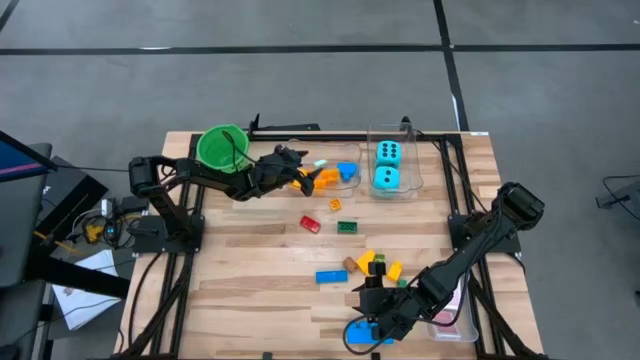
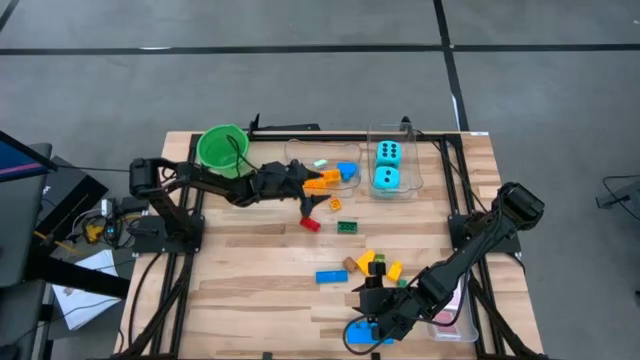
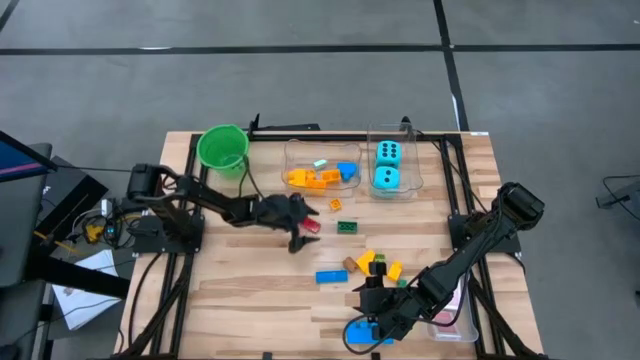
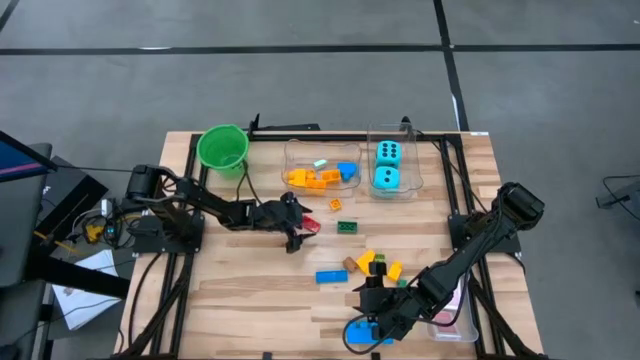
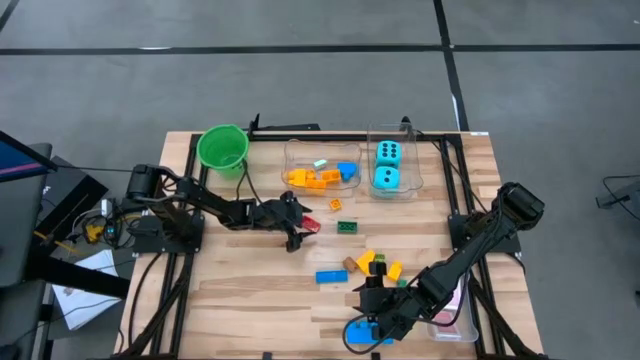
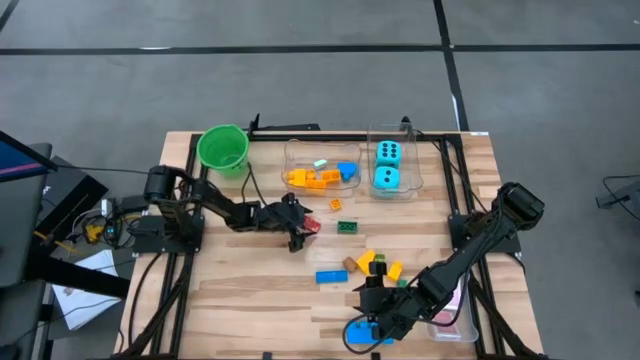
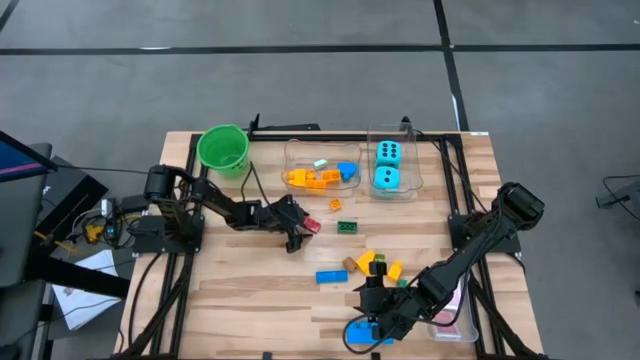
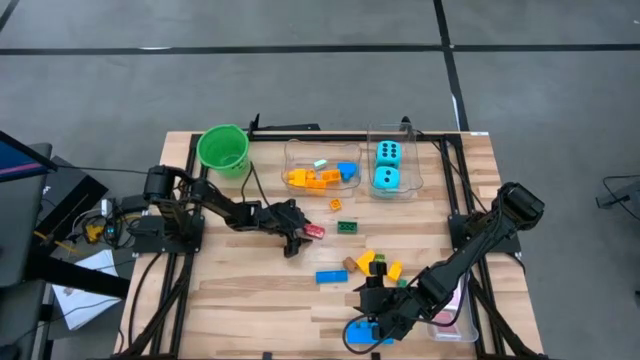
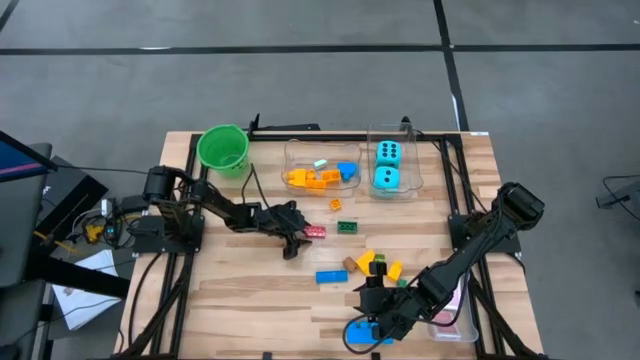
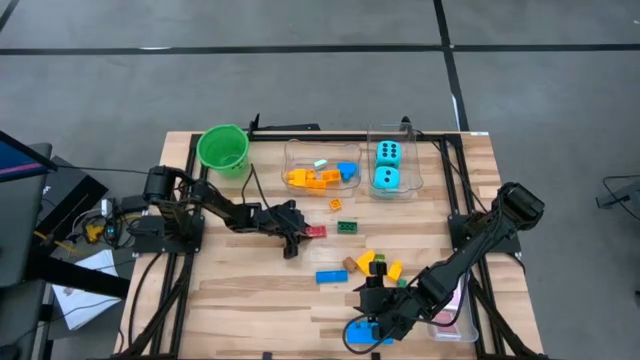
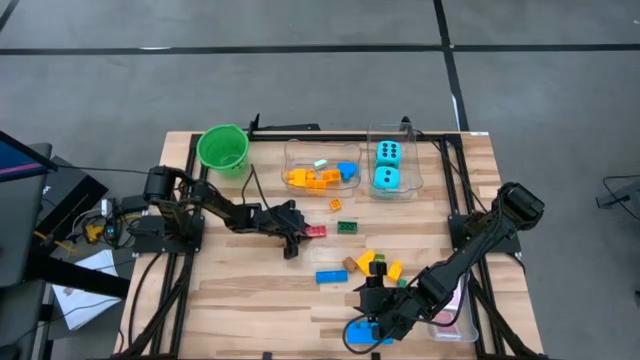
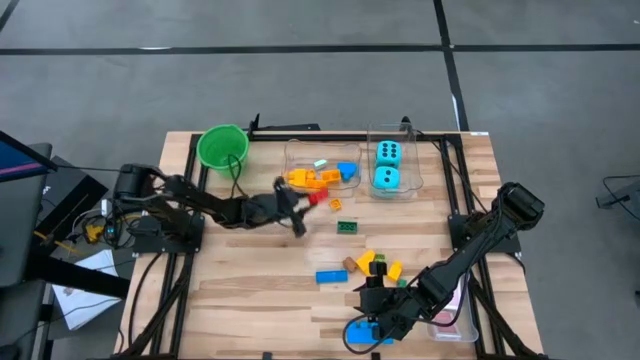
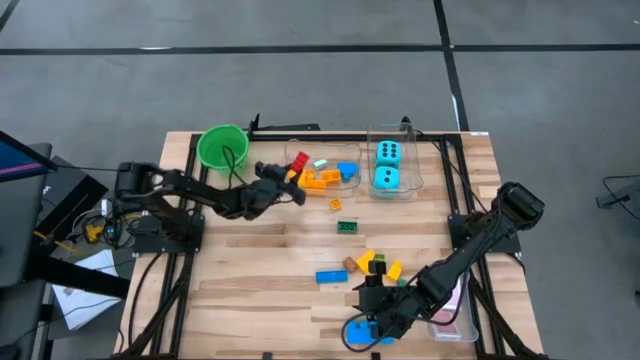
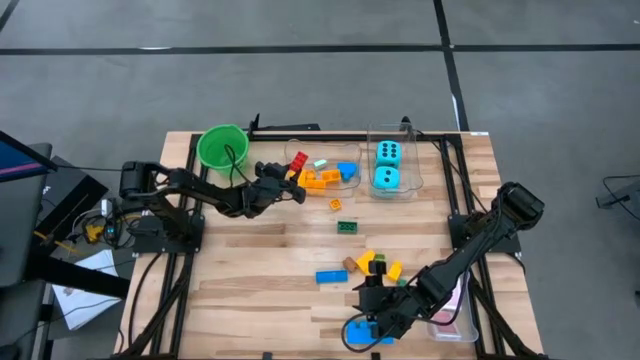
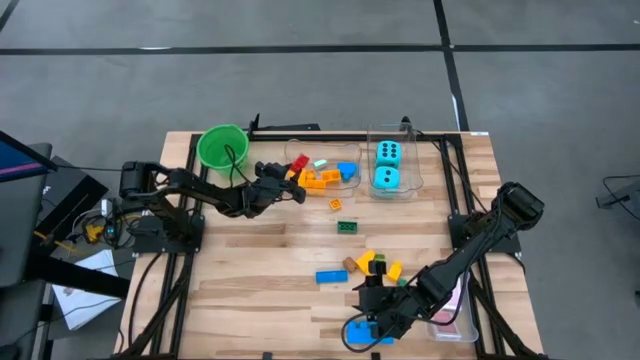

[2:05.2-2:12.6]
Task: Pick & Place Toys
Put the red gamepiece into the left transparent bin

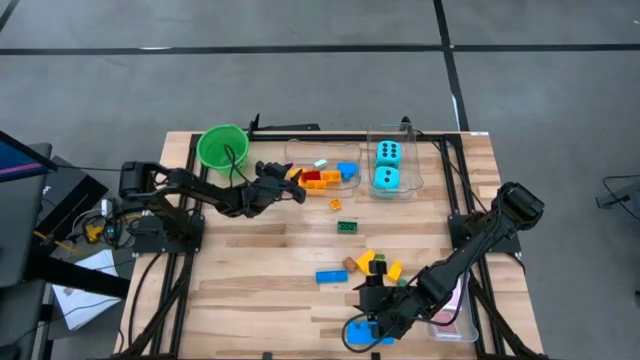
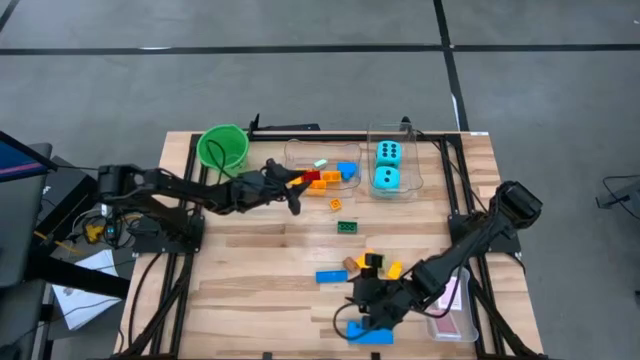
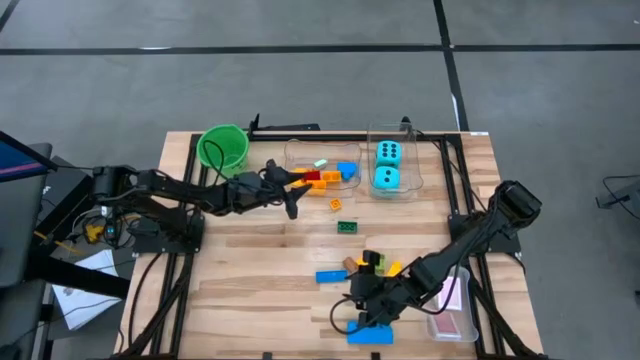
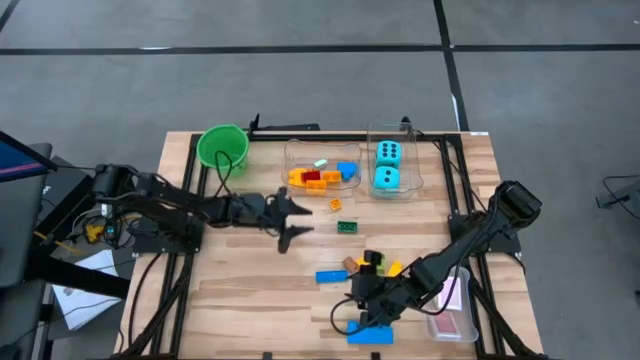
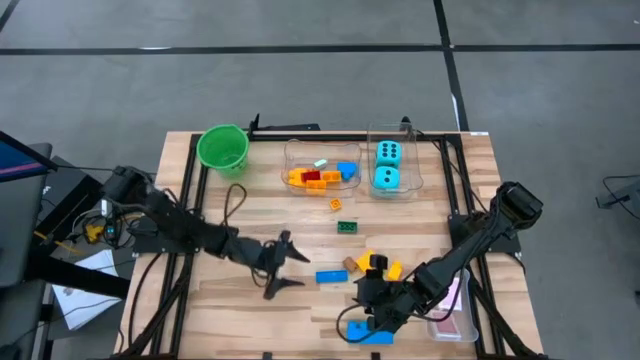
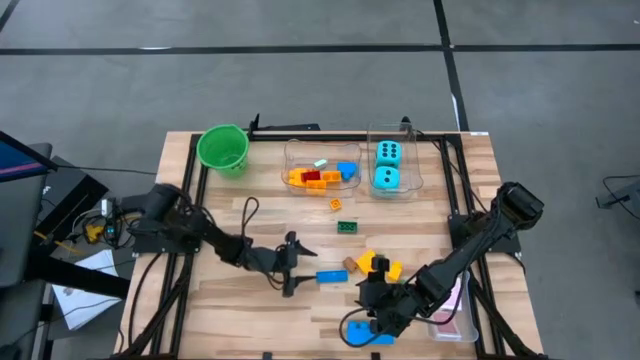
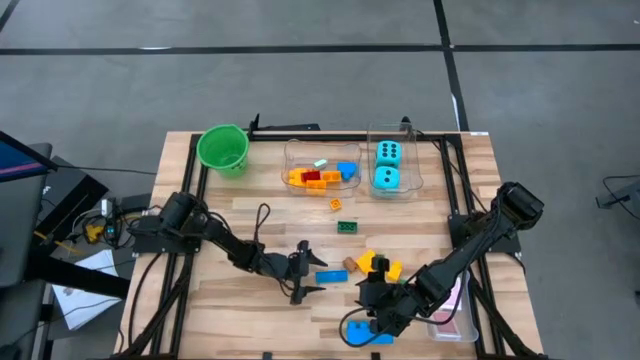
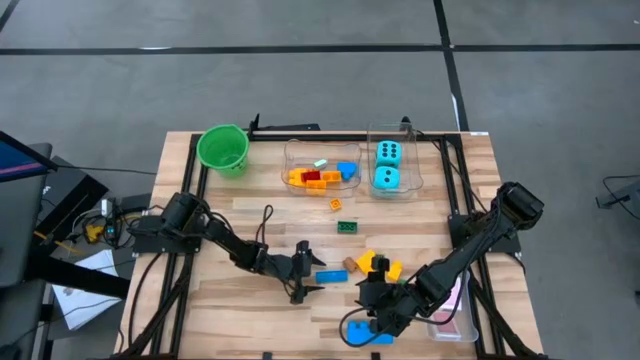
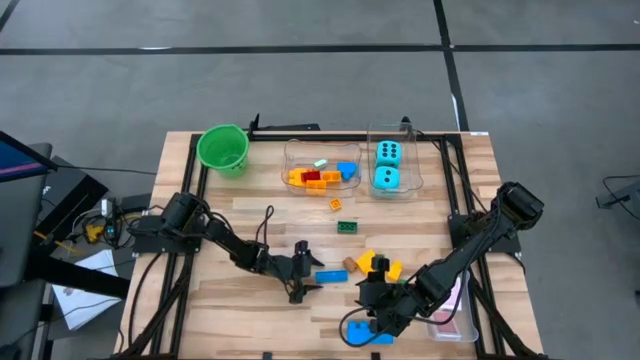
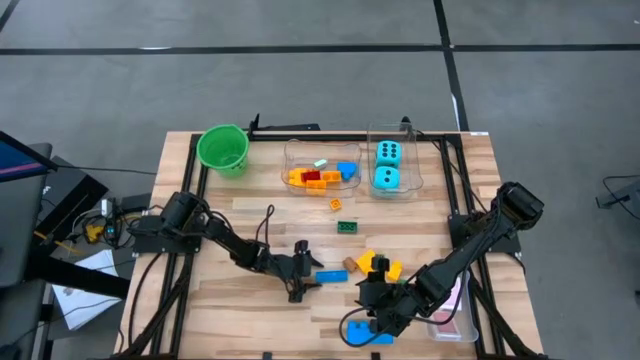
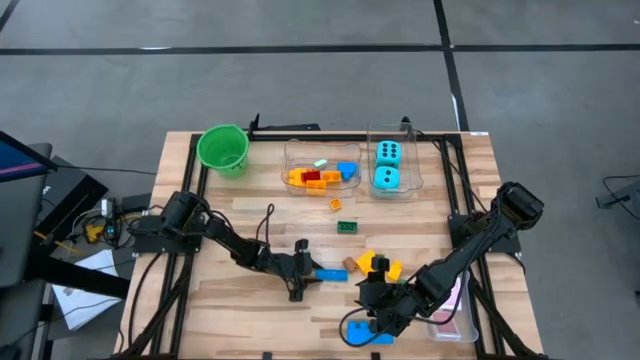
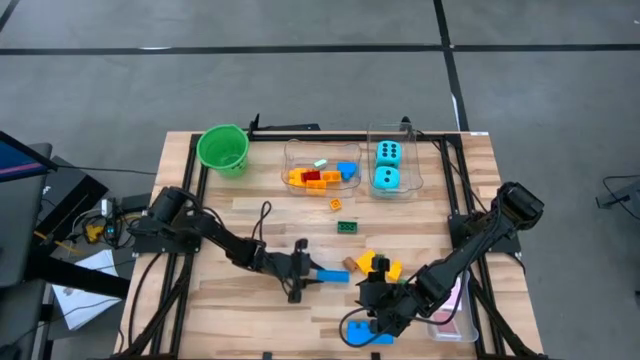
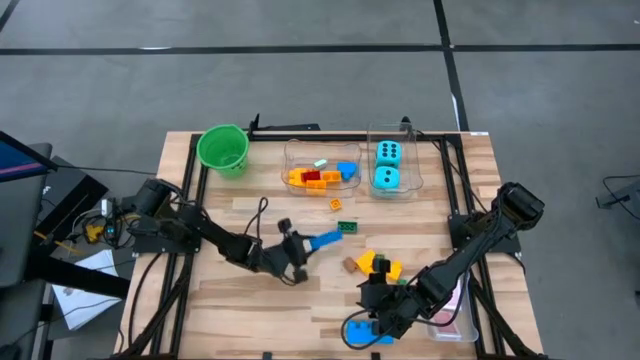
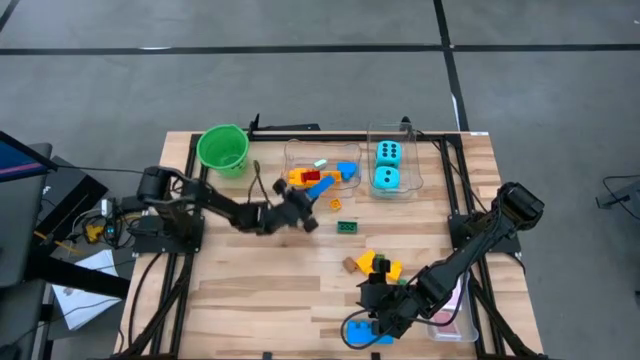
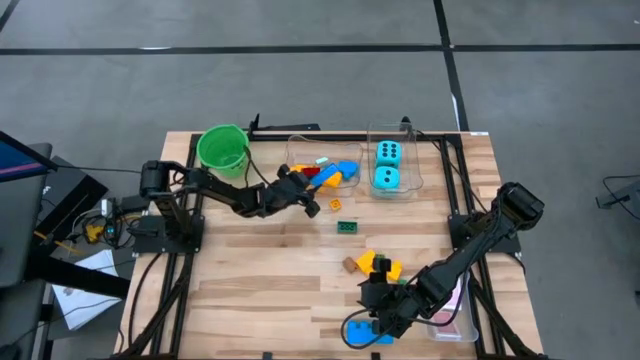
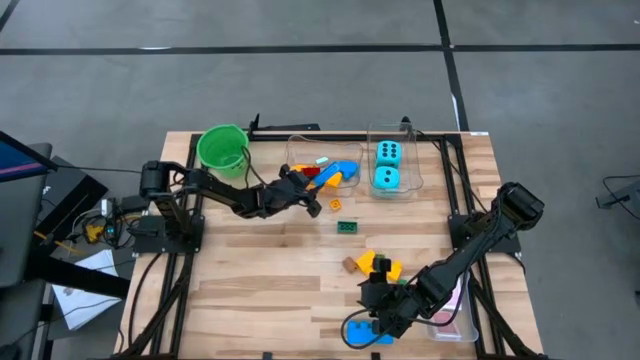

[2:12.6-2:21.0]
Put the blue gamepiece into the left transparent bin

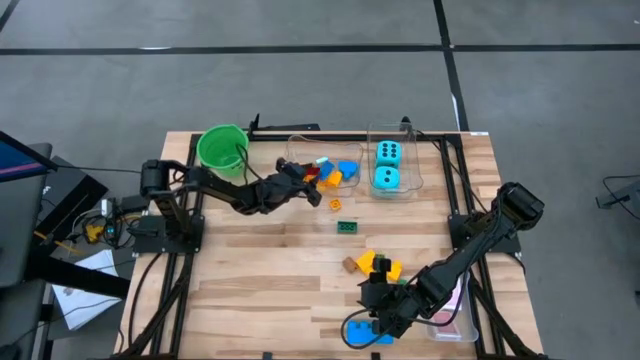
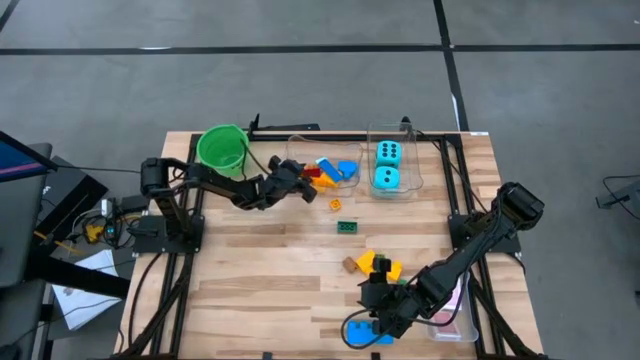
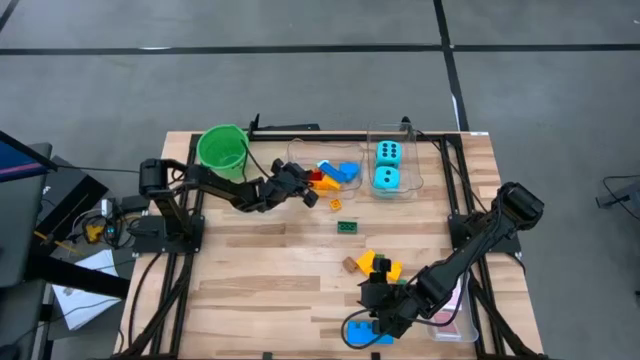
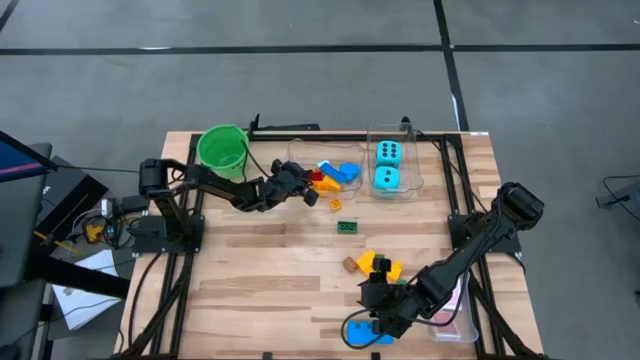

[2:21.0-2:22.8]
Adjust the left transparent bin

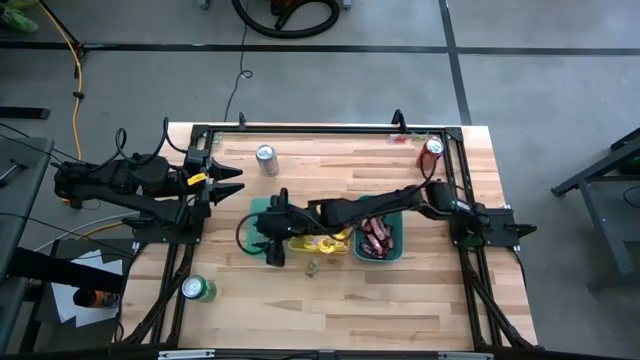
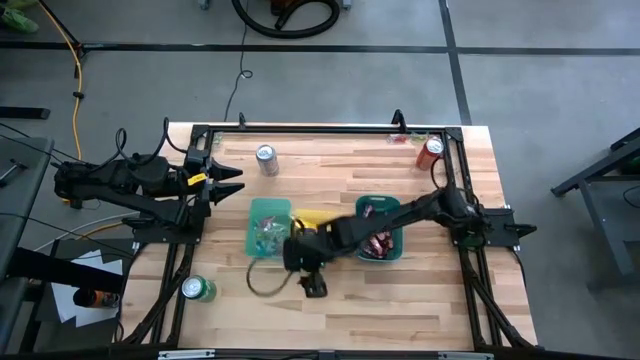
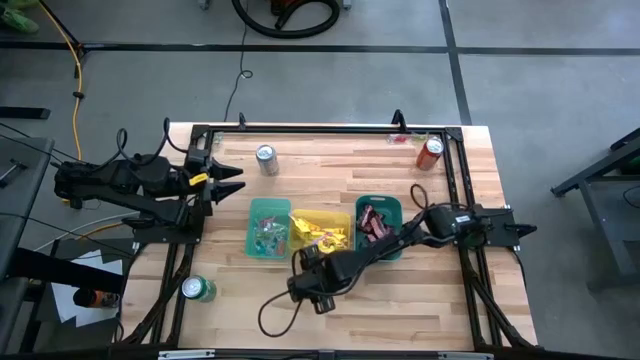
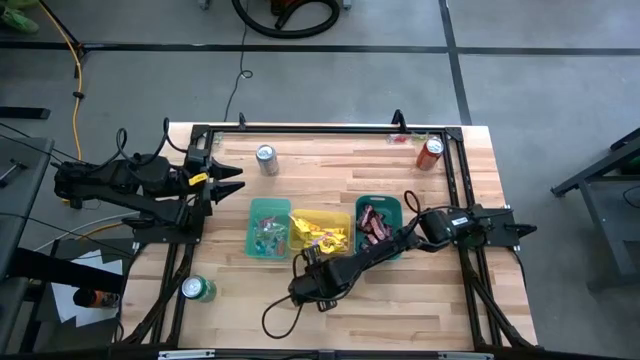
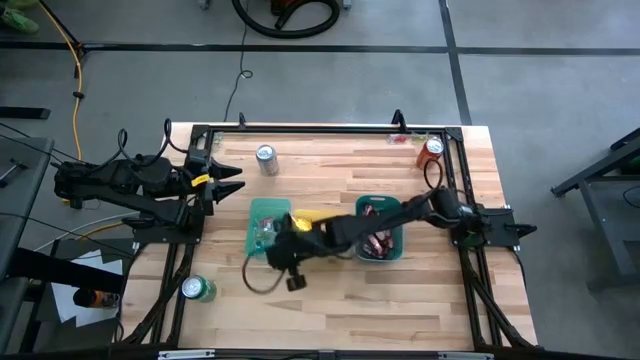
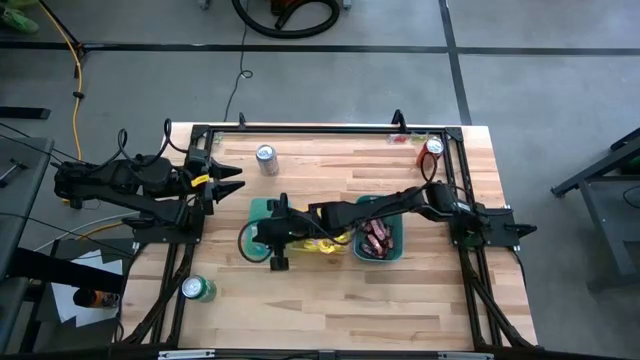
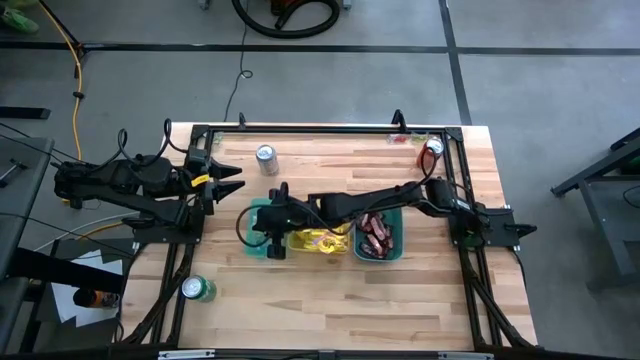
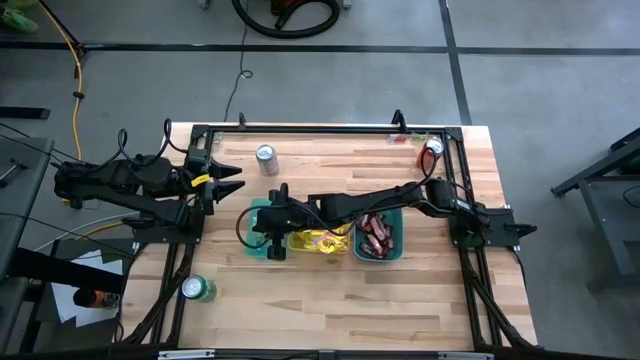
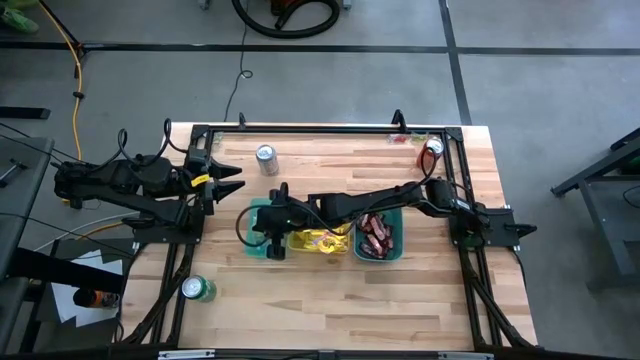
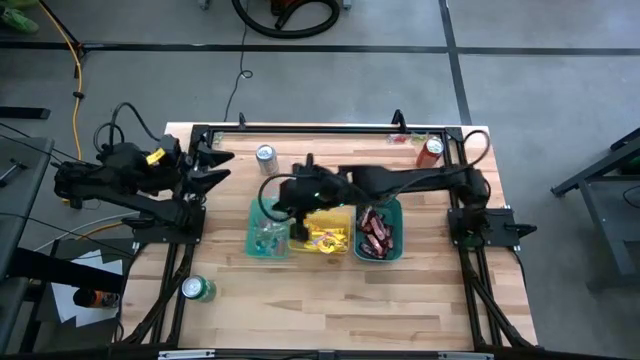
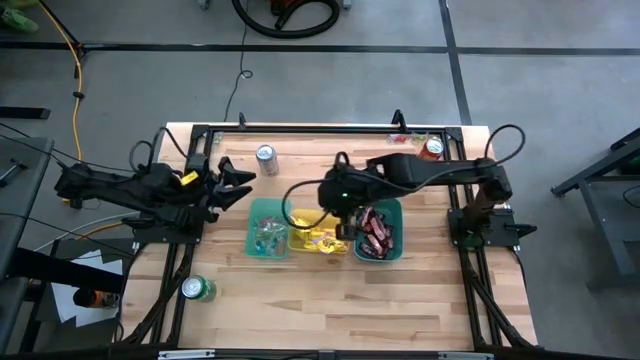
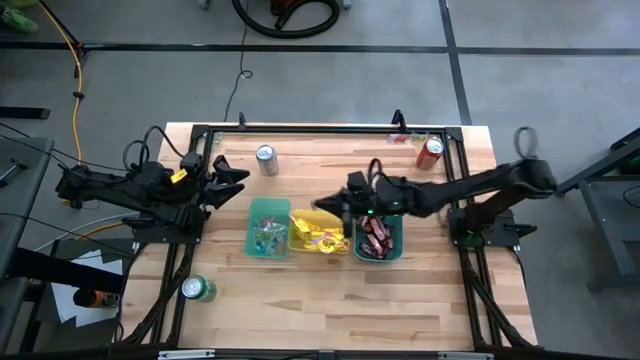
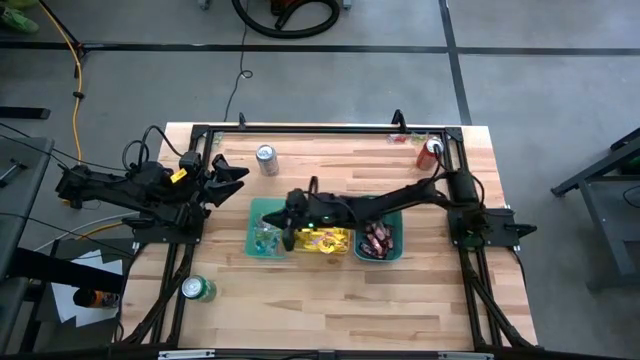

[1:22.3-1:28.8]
Task: Sort candy
Put the green gummy into the green bin
